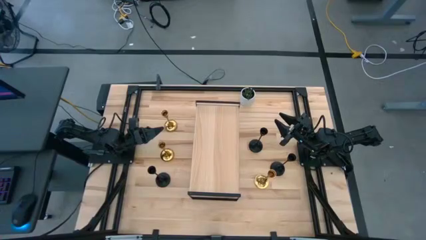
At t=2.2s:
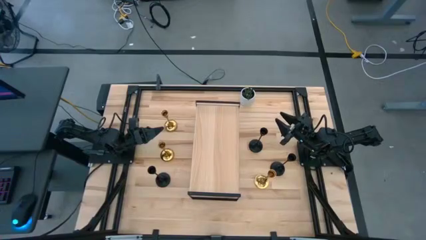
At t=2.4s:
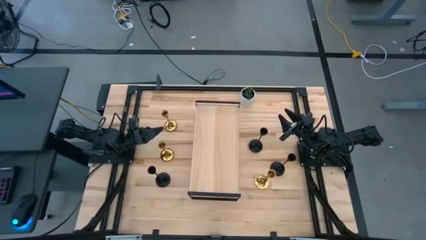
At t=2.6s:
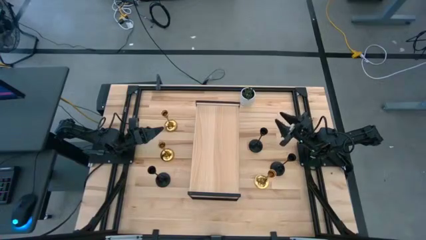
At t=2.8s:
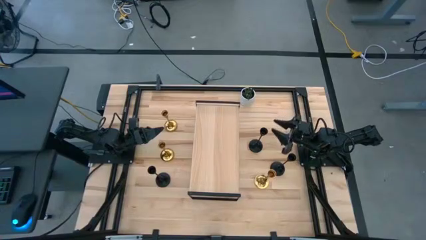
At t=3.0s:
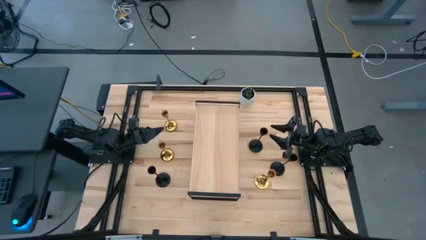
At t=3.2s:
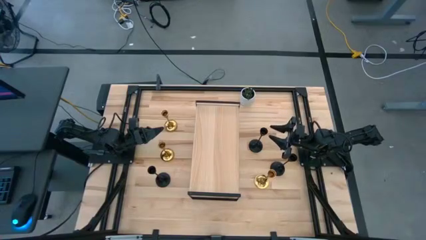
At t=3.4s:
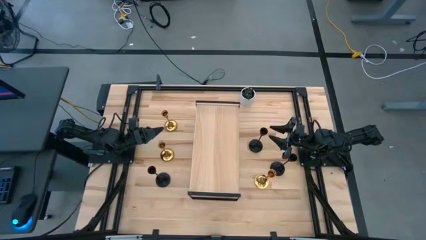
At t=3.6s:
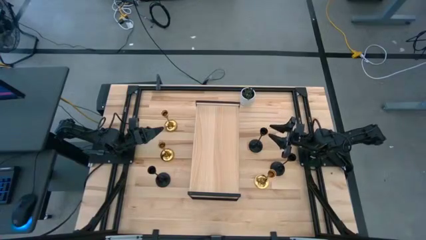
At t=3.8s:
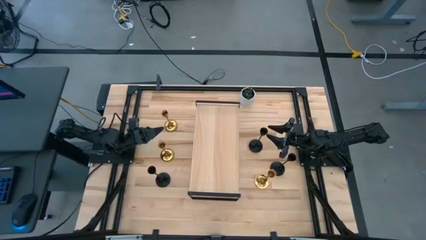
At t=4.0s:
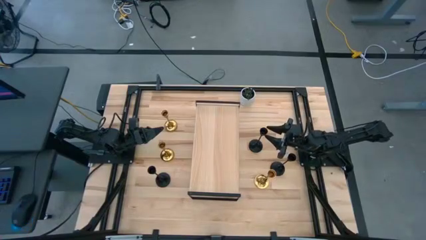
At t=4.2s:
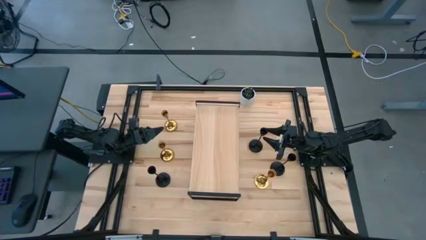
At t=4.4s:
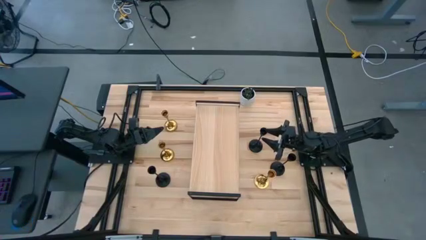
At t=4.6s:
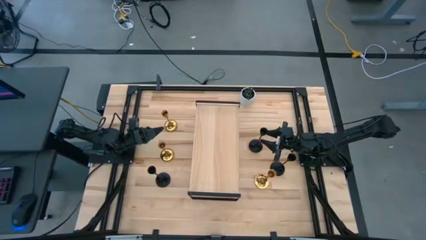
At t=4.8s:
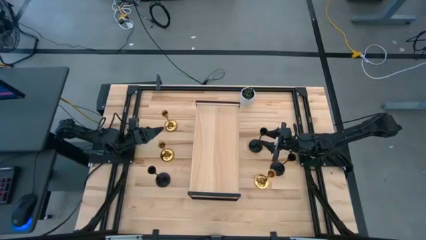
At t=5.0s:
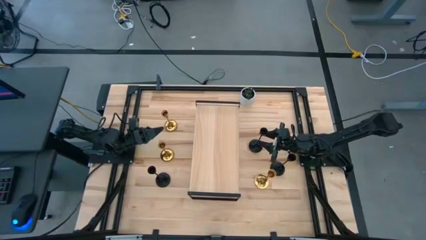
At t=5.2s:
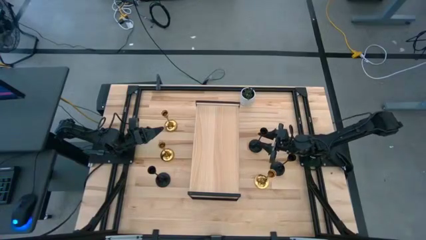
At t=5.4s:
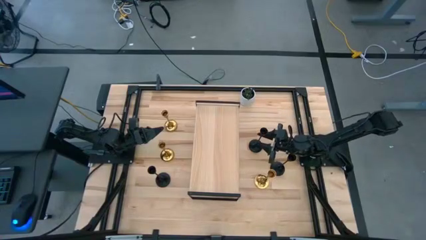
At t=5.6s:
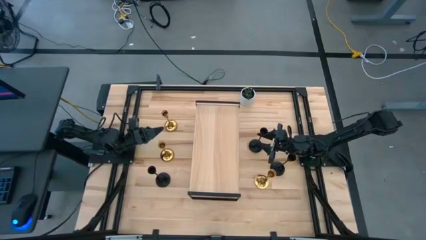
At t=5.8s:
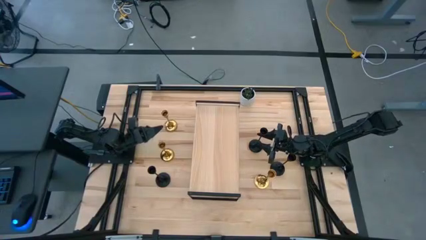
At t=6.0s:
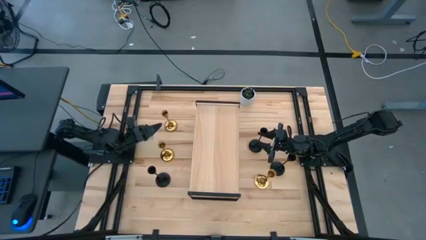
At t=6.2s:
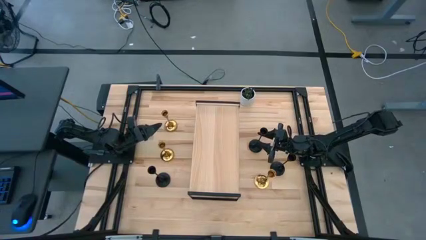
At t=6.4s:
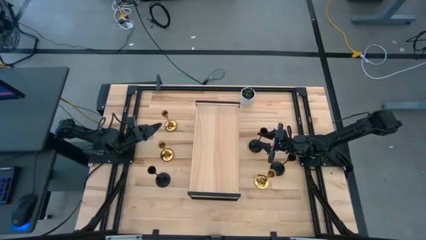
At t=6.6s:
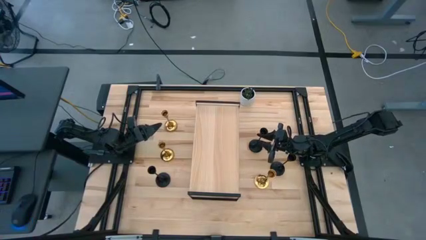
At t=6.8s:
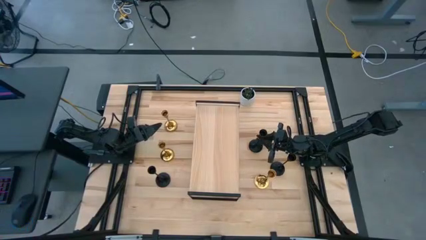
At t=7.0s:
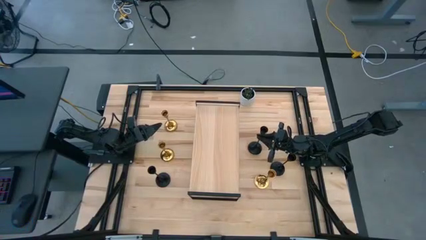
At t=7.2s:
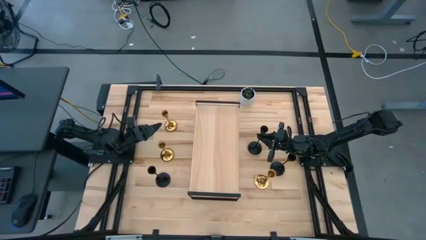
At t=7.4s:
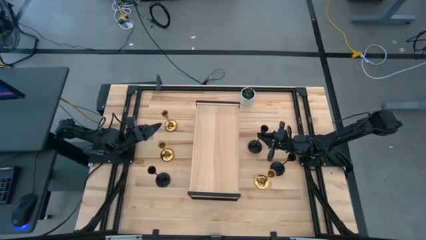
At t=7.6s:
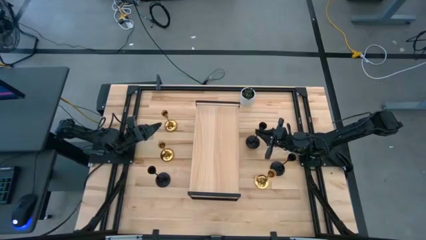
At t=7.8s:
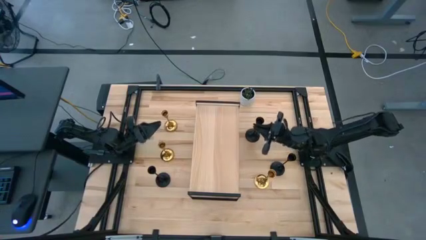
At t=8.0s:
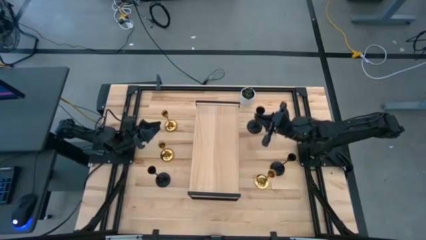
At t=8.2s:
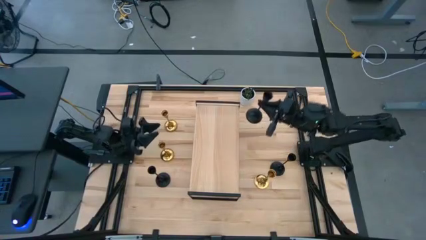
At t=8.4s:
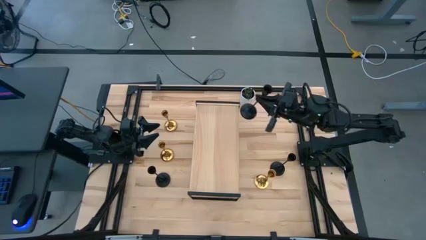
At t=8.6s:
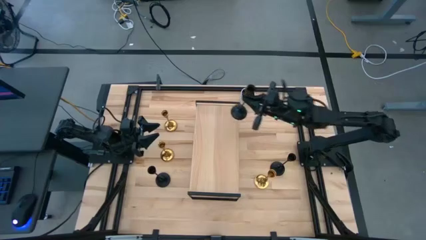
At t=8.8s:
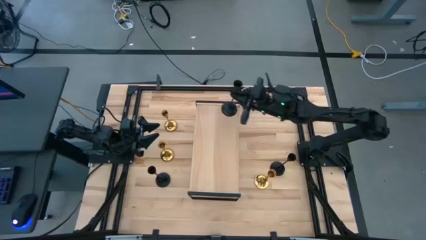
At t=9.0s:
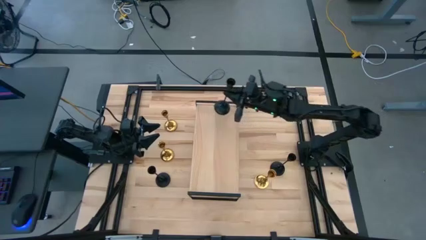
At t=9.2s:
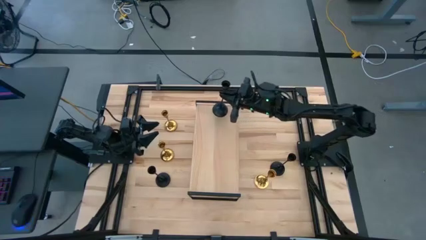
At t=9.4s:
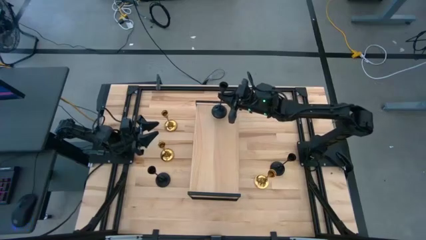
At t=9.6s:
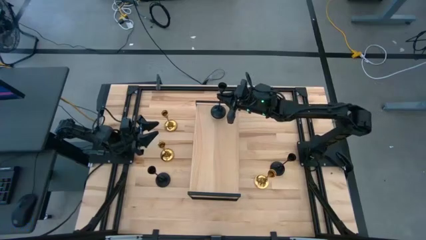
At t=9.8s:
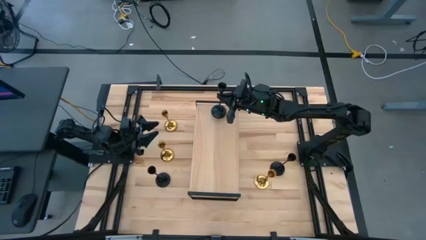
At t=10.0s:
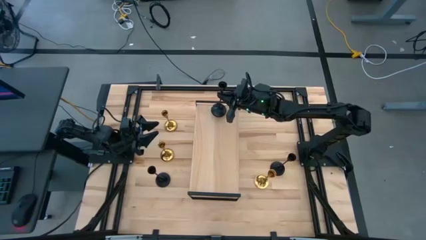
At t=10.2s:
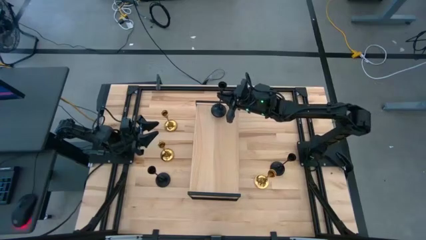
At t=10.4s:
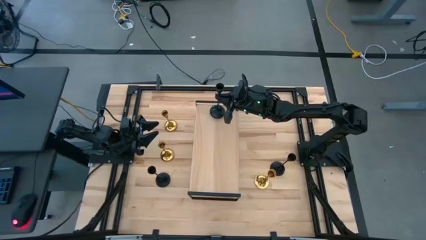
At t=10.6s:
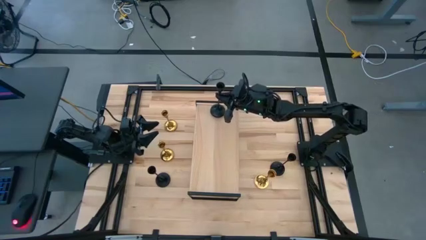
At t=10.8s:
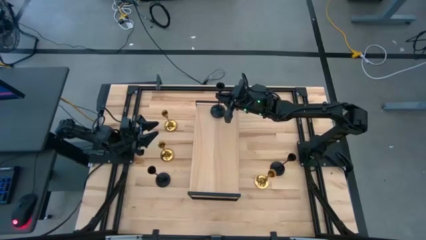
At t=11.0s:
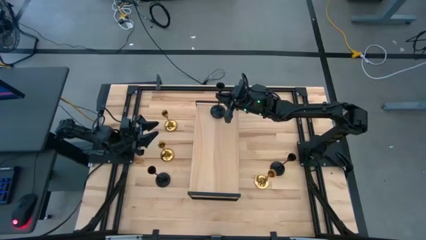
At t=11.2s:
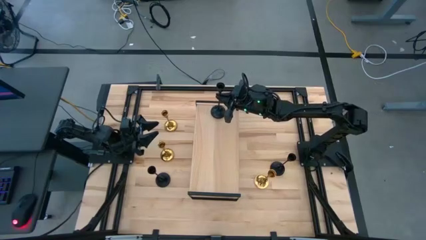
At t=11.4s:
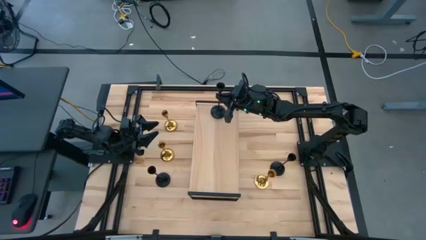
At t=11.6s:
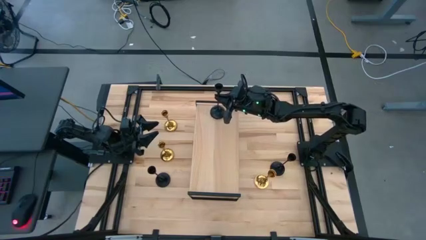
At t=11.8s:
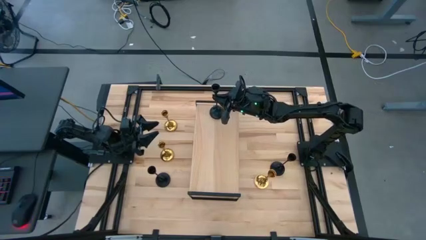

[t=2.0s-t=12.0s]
Task: Pick & Place candle stick holders
Put the top right black candle holder on the shelf

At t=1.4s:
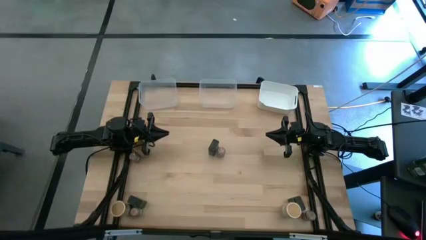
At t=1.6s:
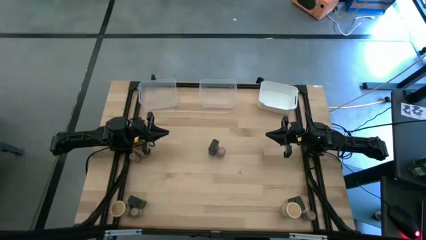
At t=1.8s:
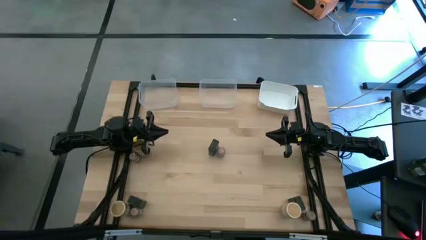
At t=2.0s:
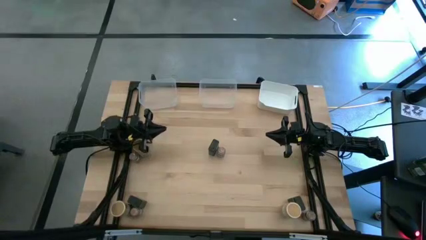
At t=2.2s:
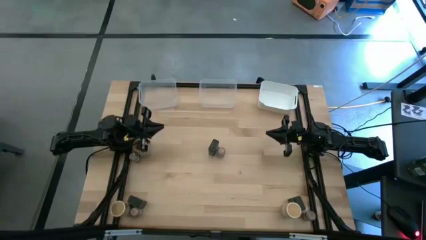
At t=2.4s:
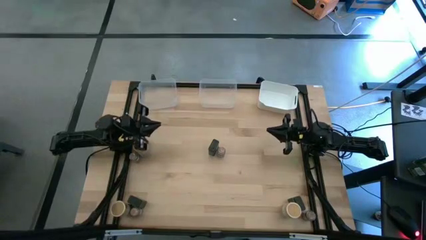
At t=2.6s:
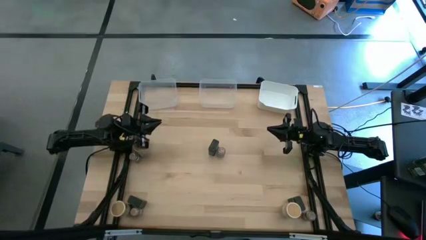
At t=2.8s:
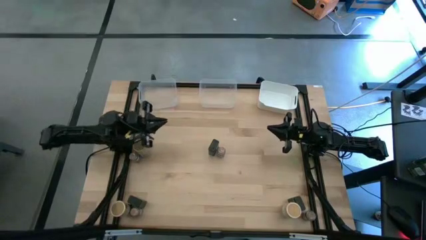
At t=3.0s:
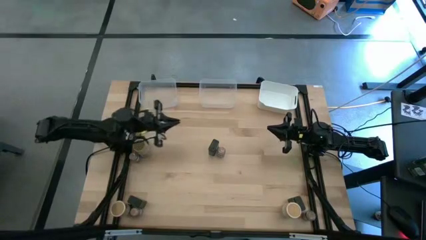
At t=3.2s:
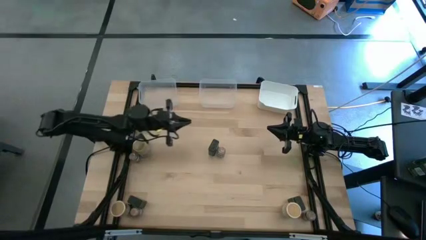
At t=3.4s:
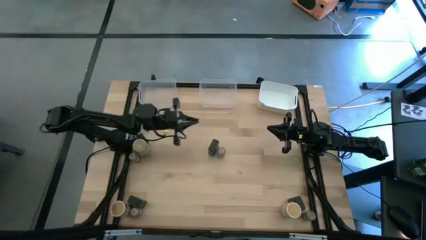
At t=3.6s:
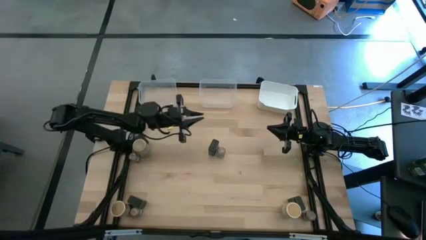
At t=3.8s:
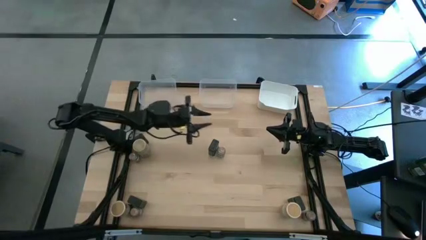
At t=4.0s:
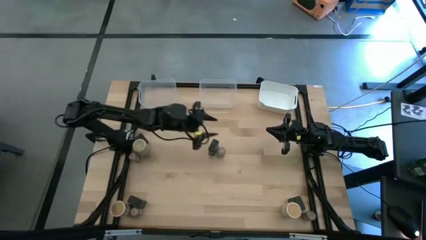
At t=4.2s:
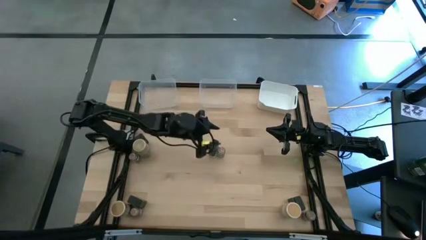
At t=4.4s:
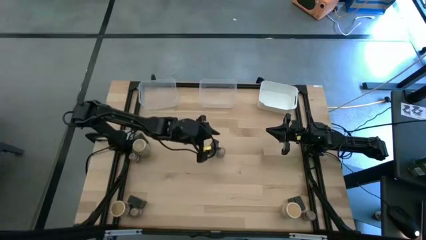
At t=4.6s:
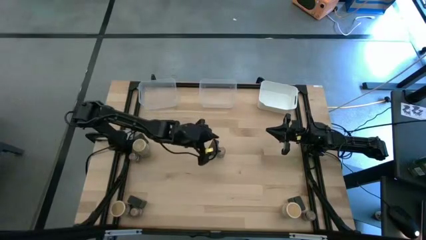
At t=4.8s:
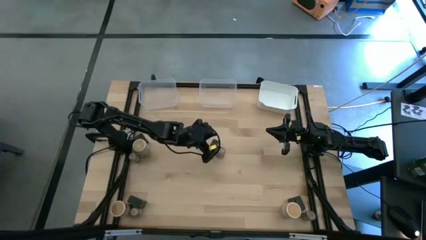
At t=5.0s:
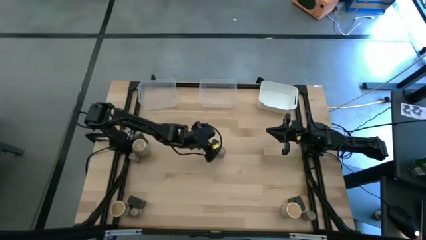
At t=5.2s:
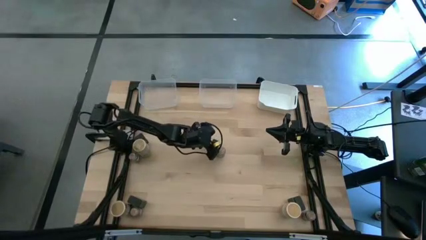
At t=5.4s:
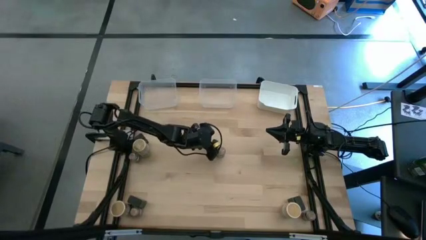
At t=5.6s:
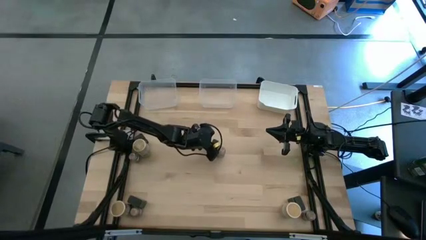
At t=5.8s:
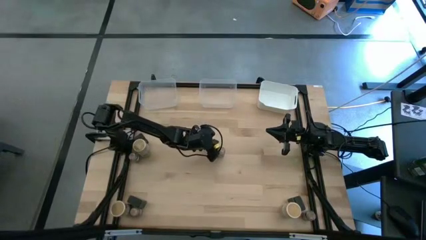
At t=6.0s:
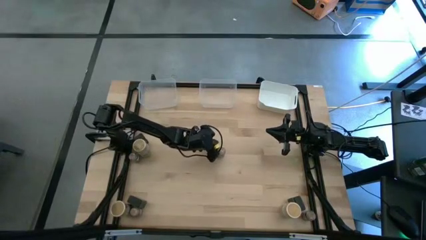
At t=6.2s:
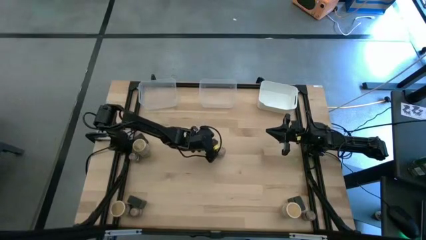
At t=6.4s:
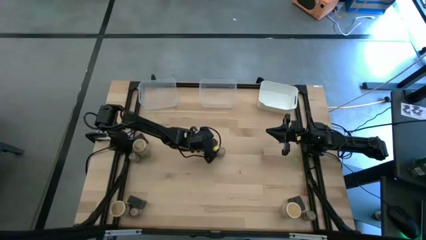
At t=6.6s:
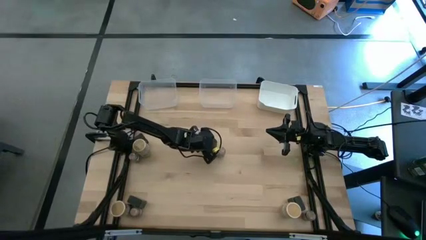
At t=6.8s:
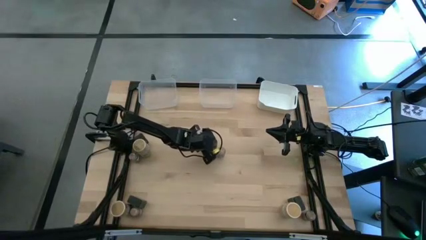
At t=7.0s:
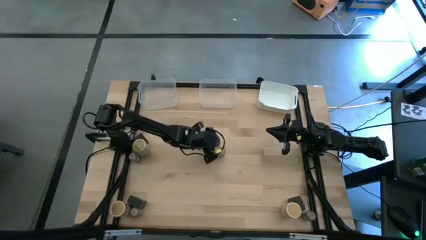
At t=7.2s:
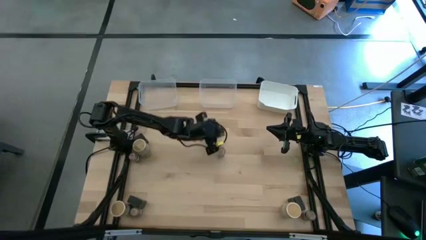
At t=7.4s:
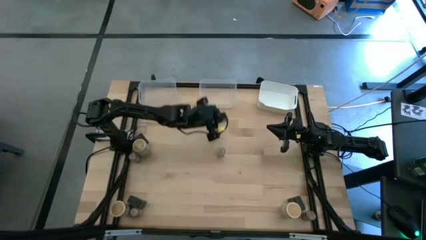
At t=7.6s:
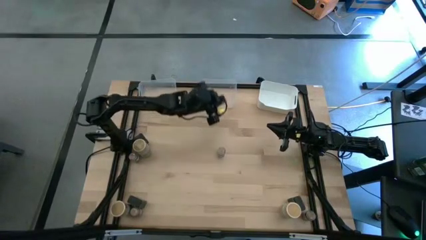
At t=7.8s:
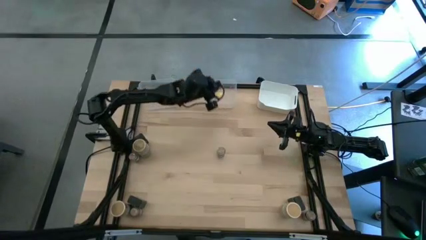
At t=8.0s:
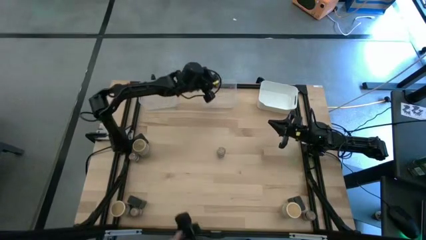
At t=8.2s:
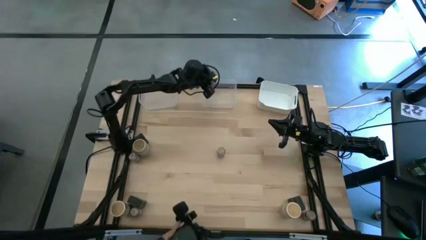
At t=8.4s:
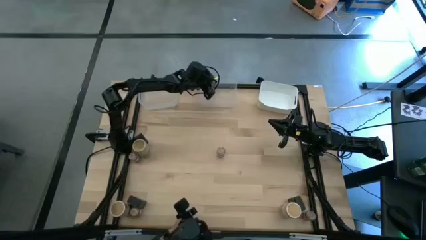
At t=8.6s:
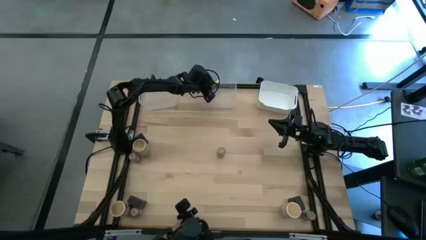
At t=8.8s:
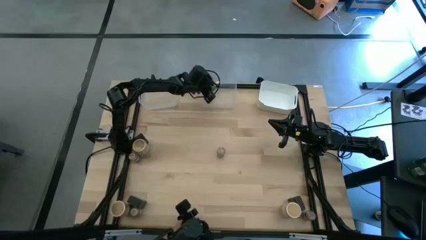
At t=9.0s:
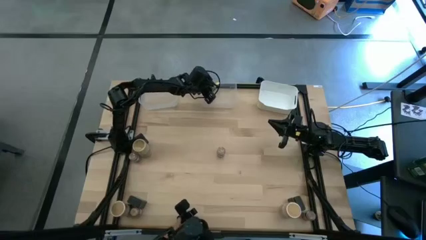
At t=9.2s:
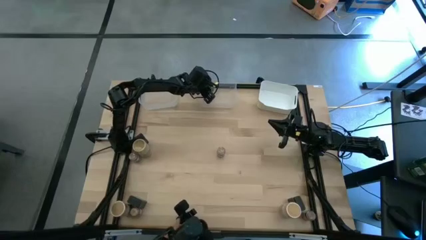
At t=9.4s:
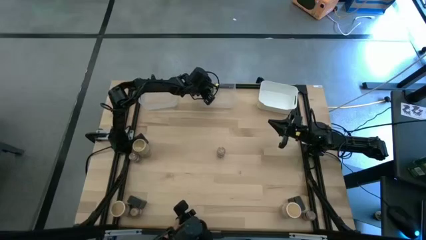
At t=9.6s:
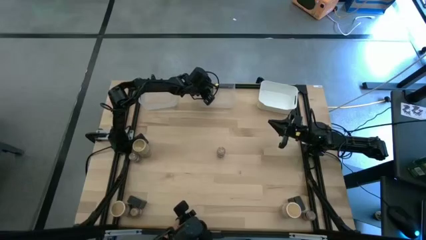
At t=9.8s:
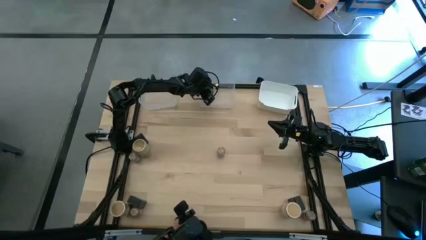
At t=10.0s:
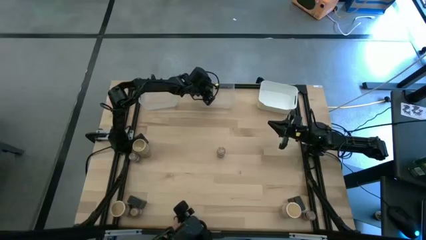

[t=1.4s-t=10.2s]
Task: Sort spices by type
Put the center black seasoning can into the middle transparent bin
